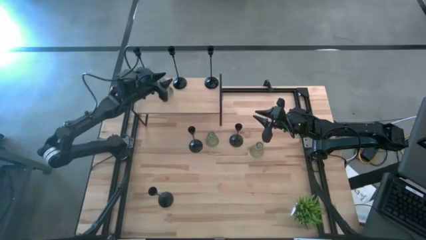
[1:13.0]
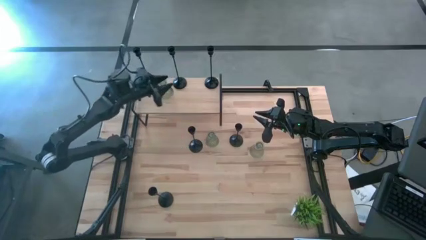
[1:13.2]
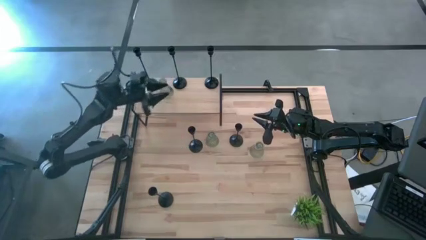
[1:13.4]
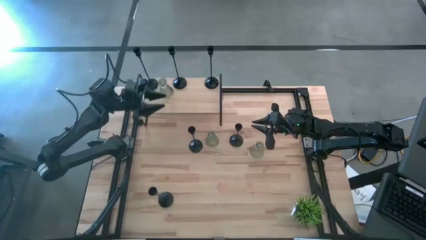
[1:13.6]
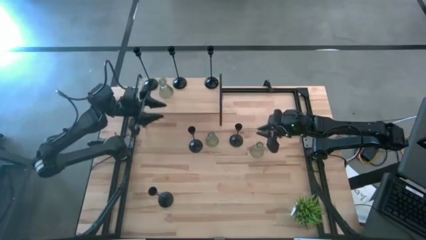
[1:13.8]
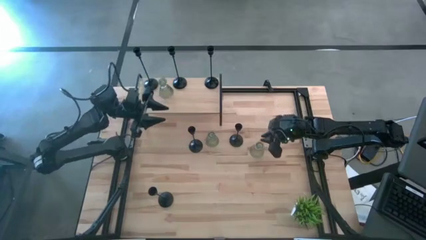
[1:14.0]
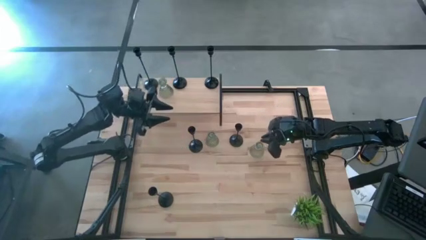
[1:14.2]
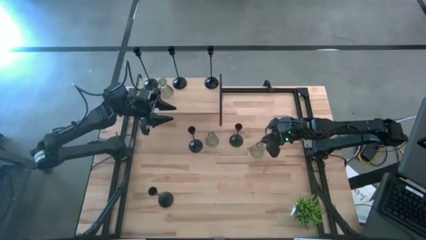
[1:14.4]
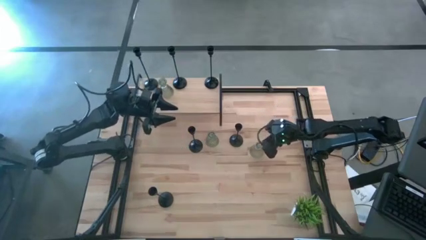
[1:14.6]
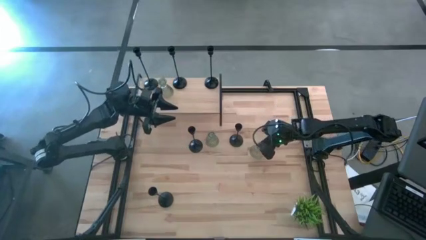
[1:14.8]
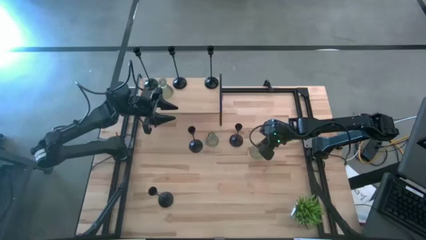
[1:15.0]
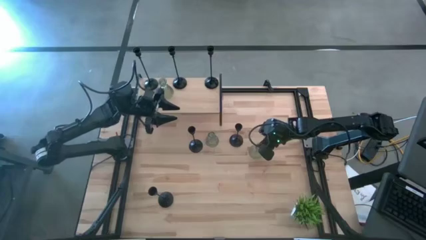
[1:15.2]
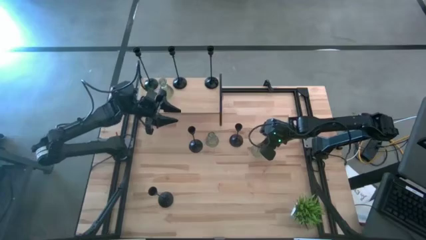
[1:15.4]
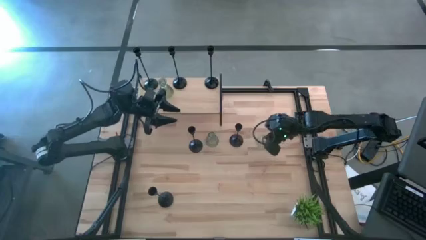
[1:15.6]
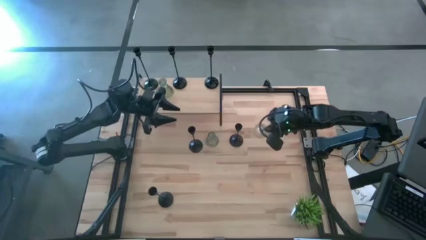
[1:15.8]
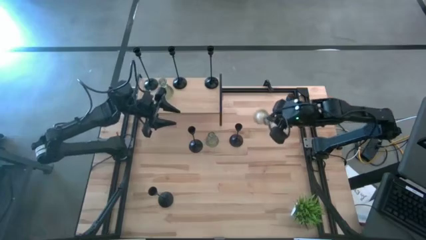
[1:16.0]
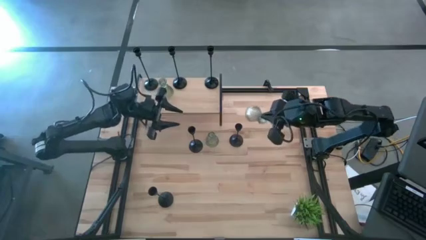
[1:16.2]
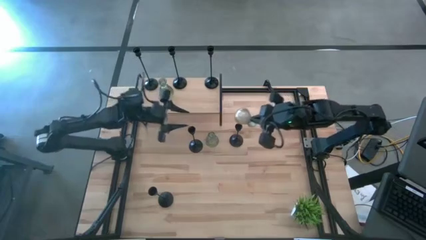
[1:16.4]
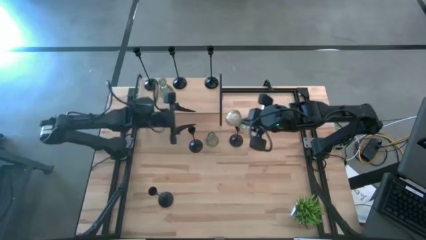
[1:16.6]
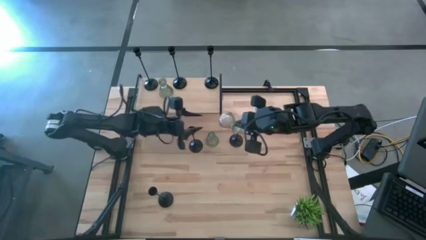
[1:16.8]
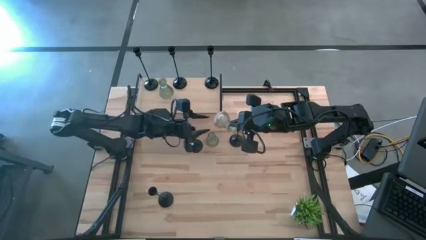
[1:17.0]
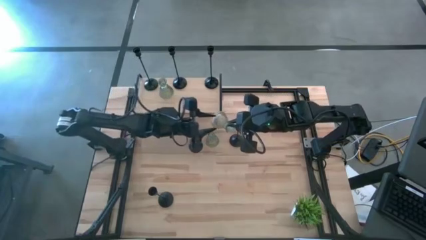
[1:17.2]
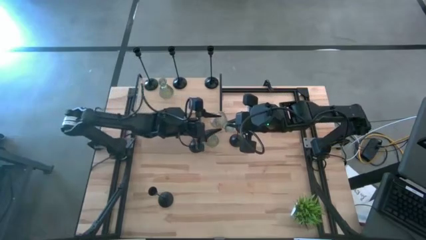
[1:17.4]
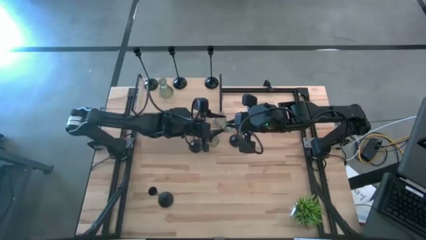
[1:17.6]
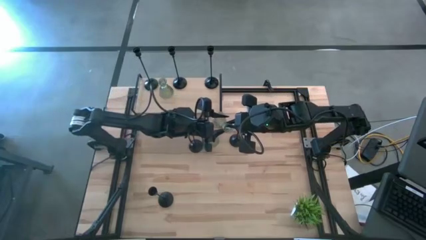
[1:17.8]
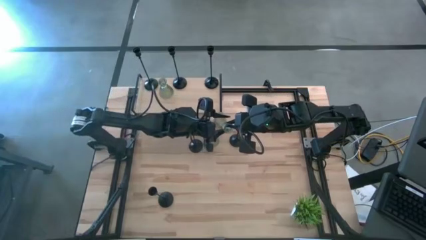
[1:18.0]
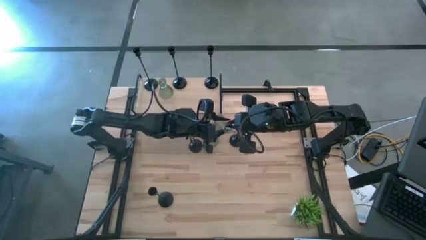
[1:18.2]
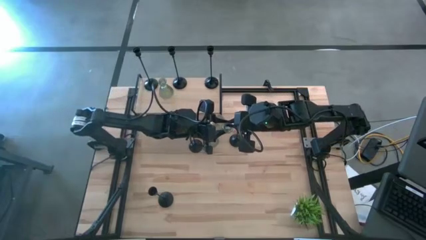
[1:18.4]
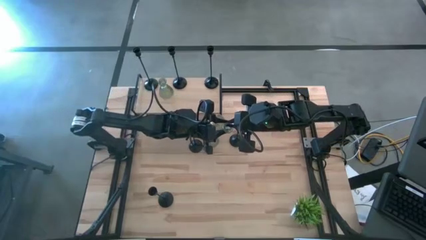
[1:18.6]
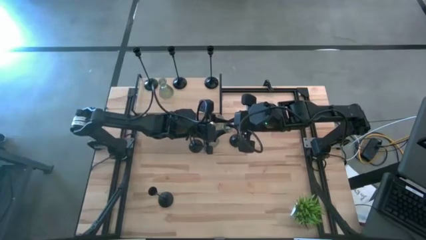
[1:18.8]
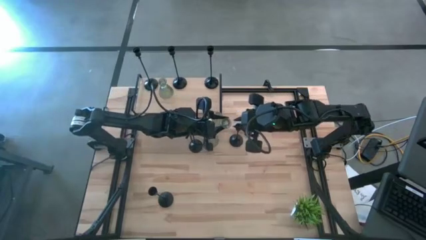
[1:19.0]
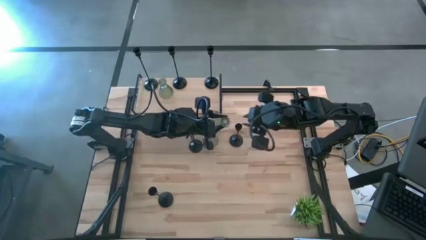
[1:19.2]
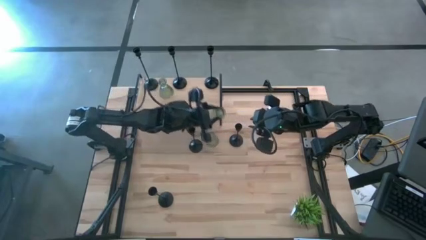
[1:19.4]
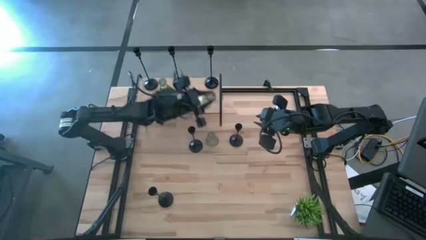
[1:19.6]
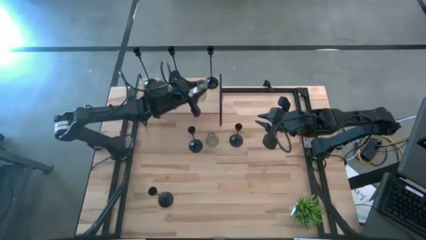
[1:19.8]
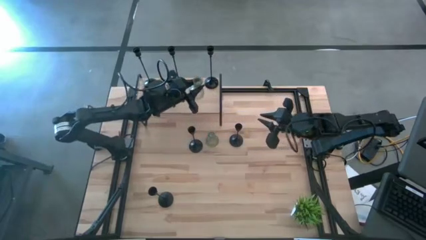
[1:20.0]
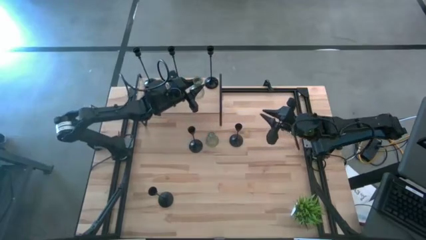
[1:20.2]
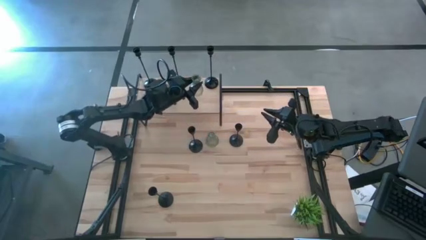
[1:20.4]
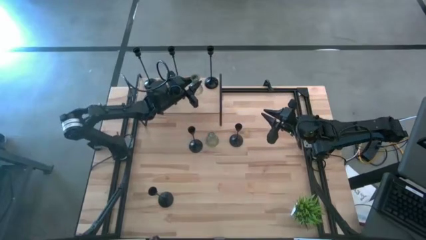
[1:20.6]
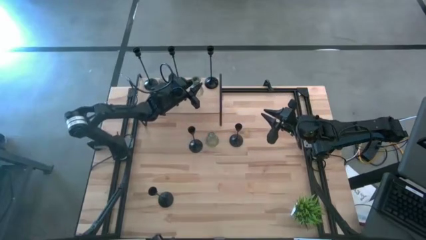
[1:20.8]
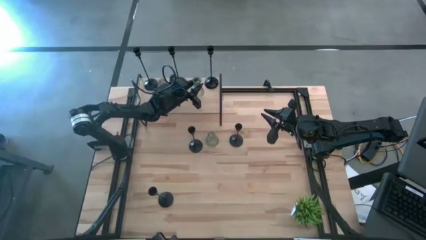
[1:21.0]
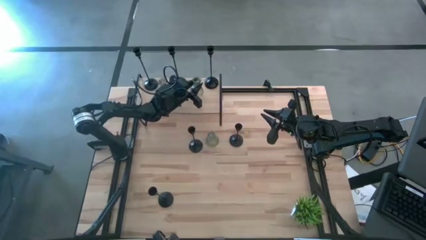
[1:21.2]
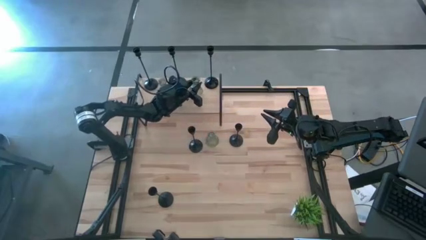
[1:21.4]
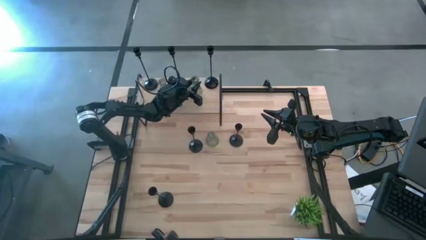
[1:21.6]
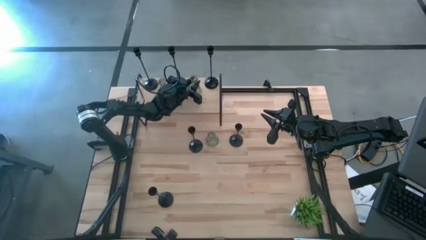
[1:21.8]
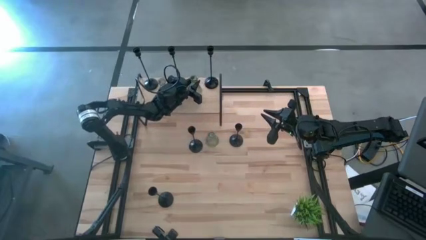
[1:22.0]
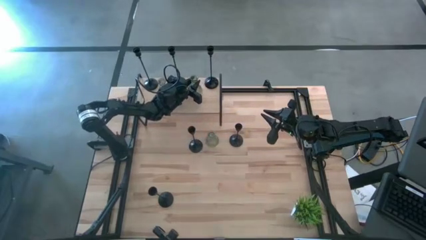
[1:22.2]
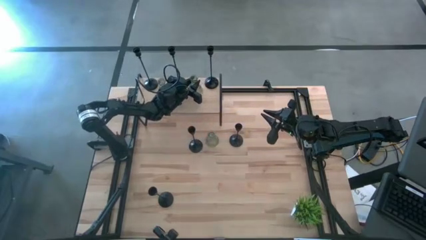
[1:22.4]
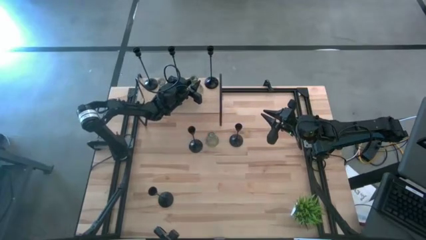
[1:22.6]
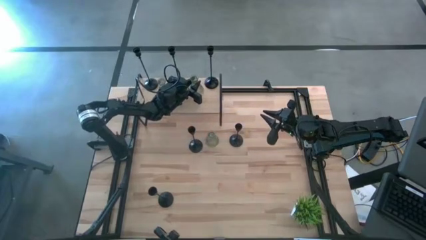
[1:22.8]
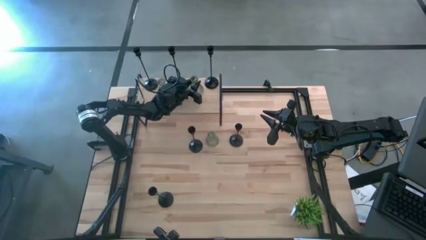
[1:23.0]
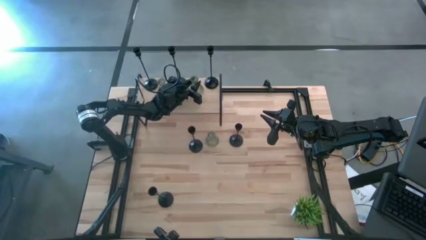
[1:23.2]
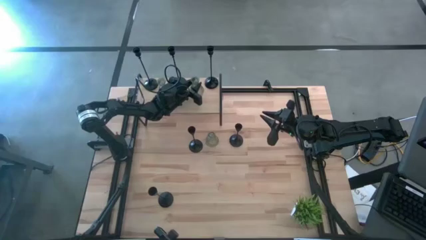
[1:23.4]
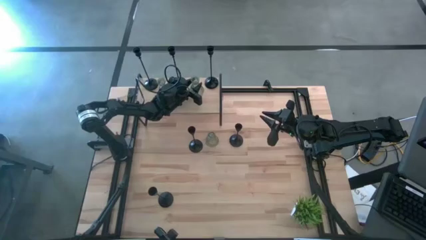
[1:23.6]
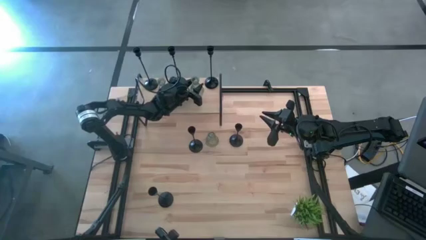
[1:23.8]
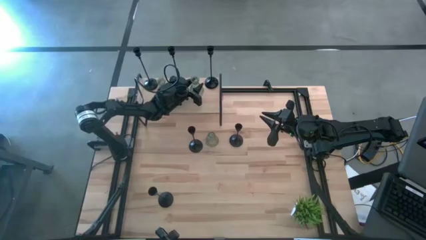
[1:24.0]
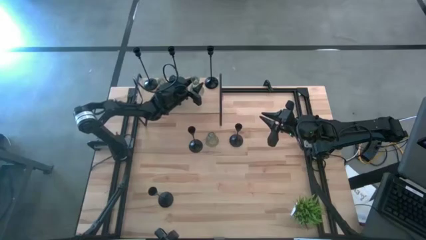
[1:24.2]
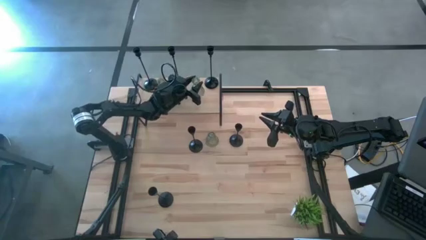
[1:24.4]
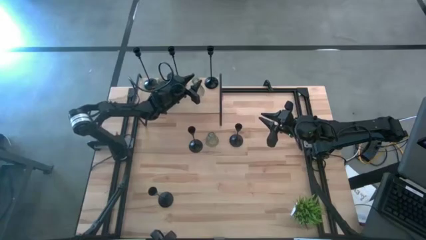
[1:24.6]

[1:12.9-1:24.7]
Task: Pick & Place candle stick holders
Put the right green glass candle holder on the shelf

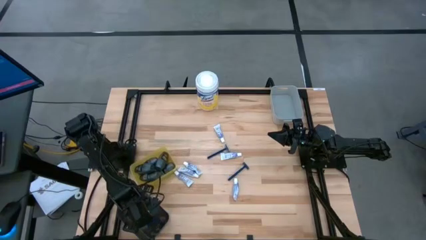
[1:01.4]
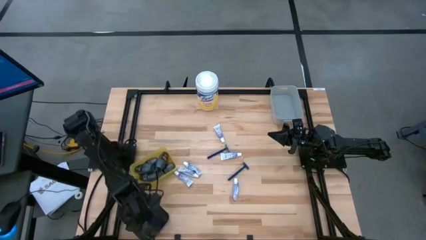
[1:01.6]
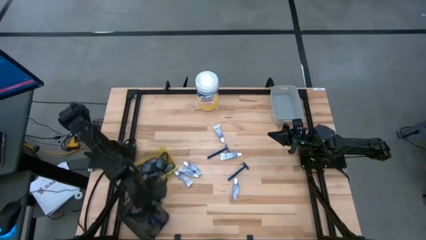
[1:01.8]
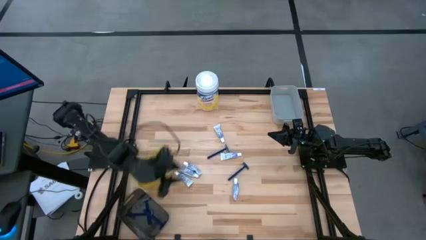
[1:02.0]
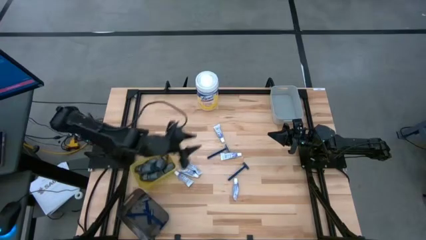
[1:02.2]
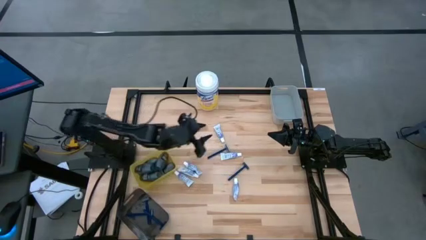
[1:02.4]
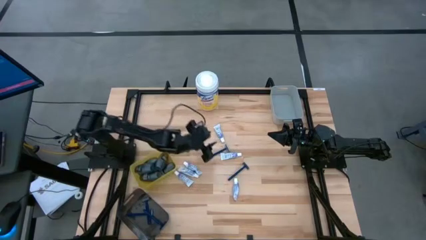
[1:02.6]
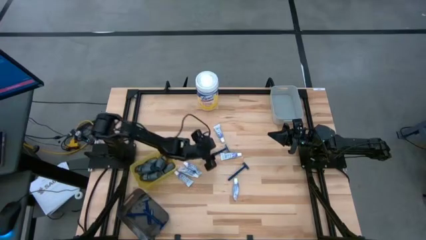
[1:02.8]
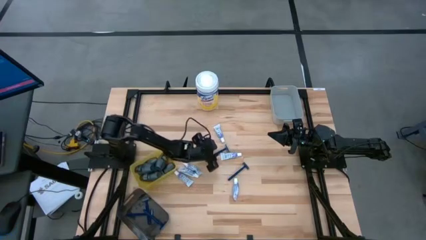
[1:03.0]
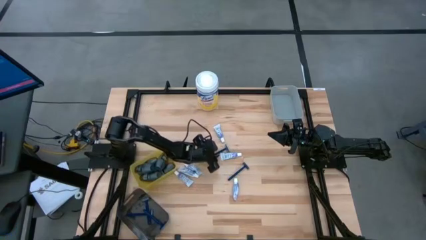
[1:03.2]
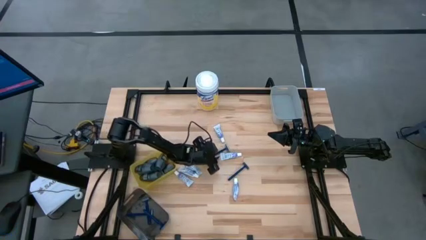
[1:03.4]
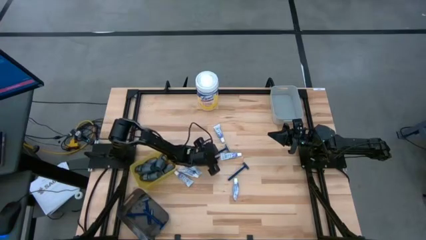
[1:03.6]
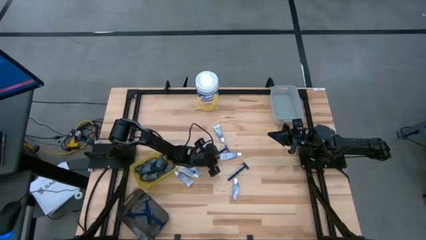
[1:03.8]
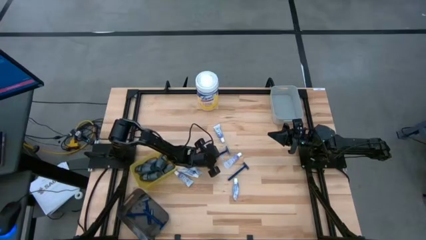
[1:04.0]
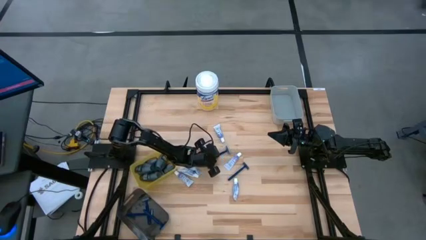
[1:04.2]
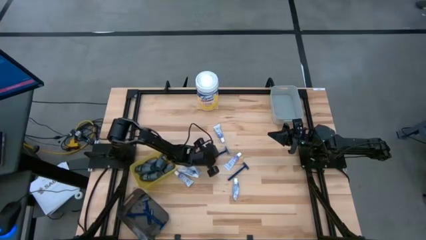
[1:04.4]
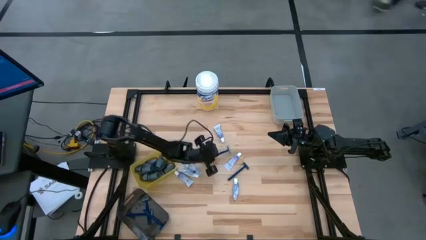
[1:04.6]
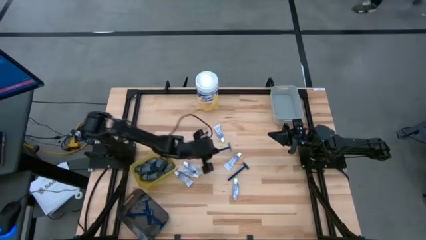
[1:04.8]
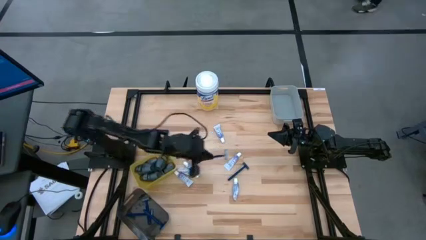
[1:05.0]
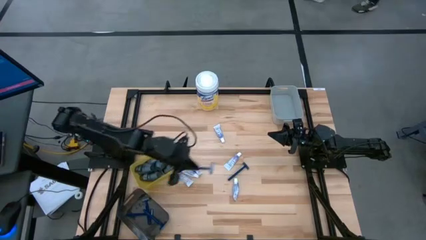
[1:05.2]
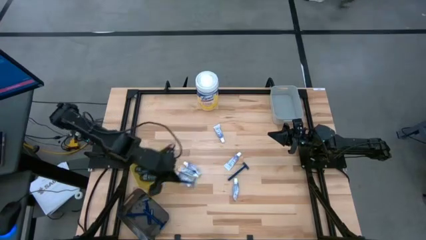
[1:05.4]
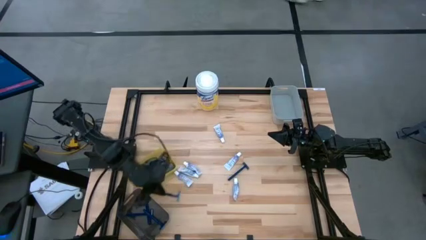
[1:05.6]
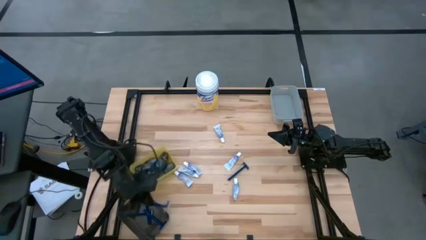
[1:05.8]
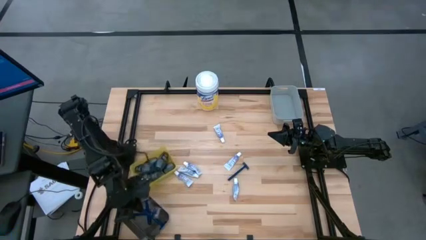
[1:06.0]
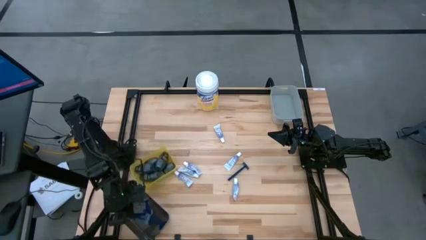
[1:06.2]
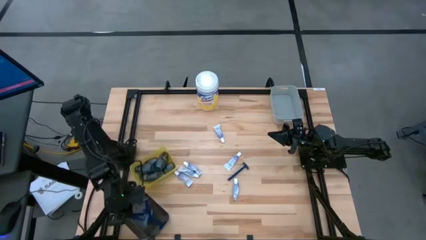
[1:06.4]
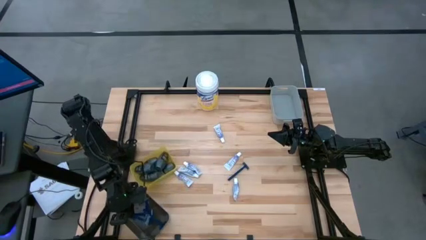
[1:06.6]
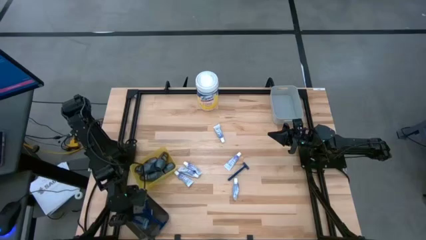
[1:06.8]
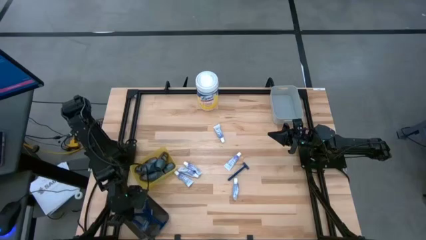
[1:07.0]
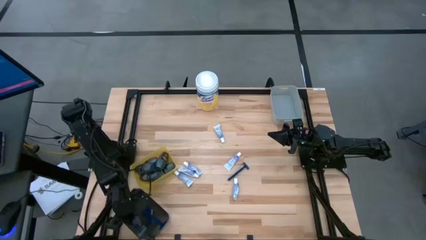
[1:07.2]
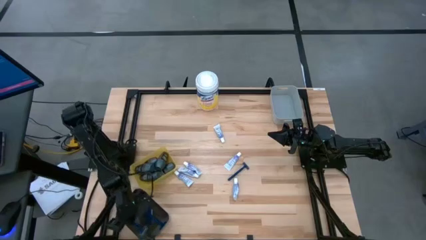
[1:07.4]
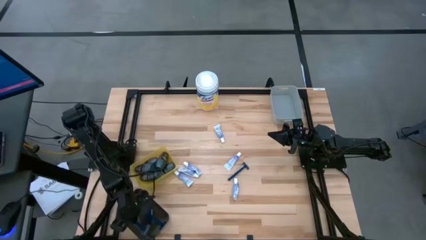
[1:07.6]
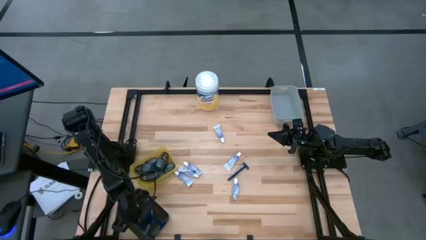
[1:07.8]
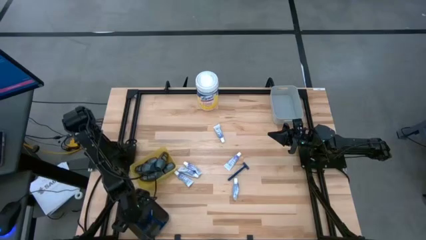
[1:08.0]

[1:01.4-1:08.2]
Task: Pick & Place Travel size toiletries
Put the dark blue razor into the black bin
